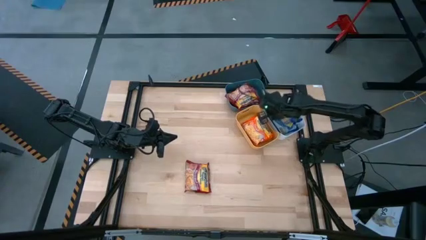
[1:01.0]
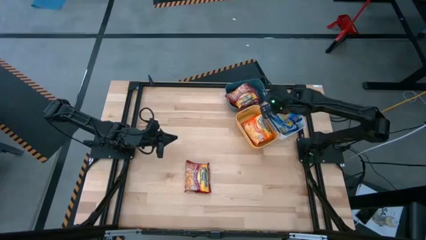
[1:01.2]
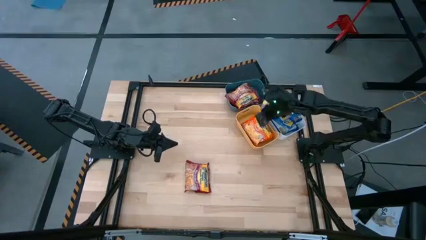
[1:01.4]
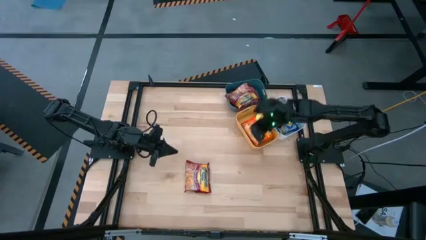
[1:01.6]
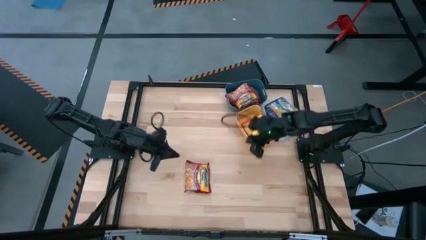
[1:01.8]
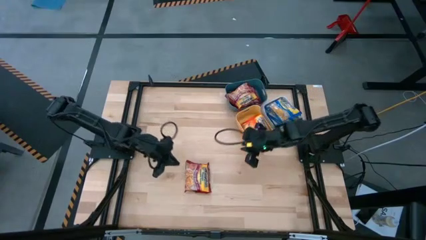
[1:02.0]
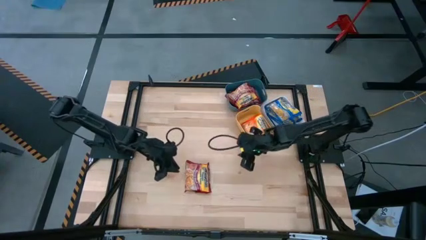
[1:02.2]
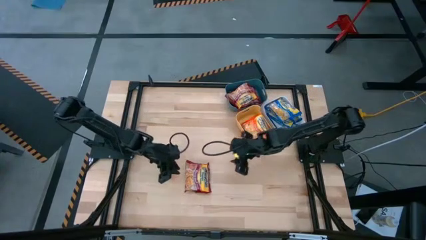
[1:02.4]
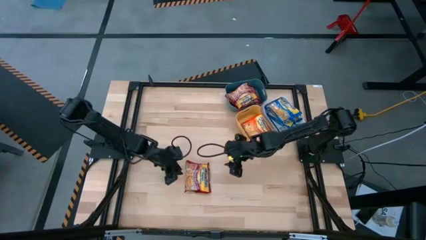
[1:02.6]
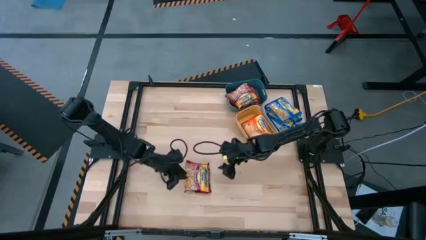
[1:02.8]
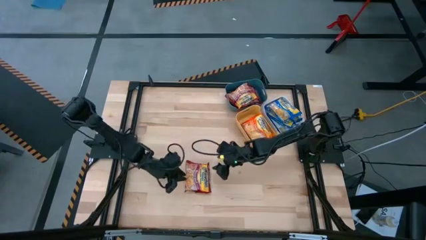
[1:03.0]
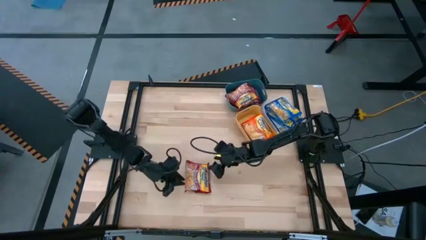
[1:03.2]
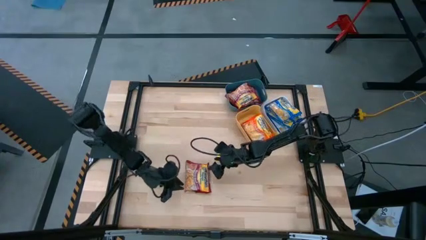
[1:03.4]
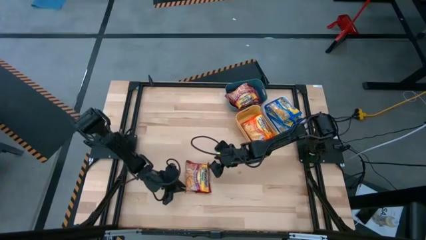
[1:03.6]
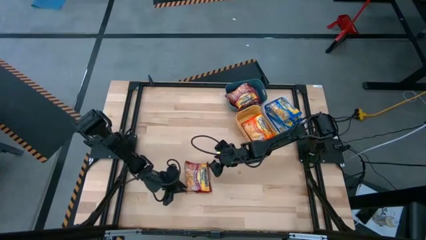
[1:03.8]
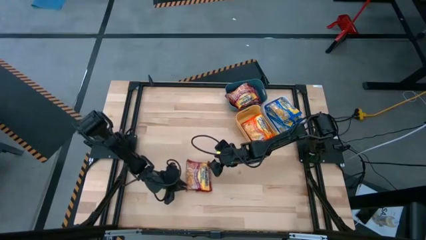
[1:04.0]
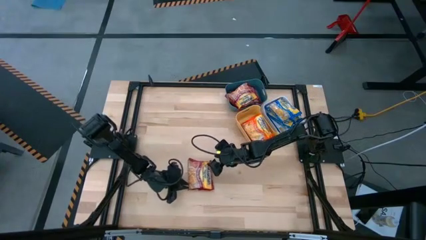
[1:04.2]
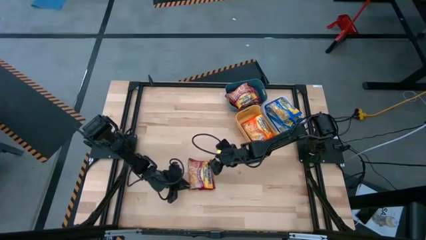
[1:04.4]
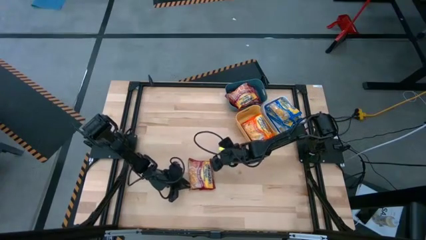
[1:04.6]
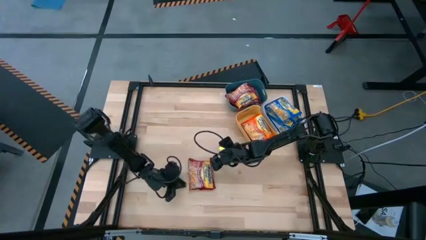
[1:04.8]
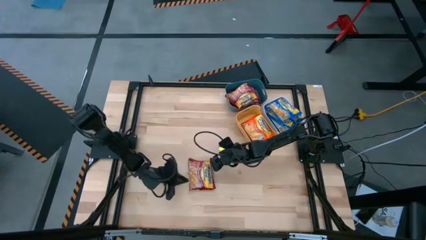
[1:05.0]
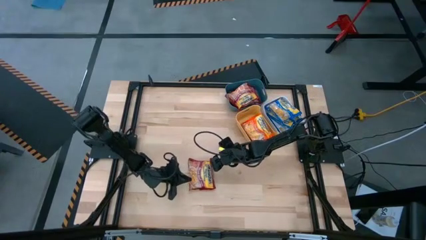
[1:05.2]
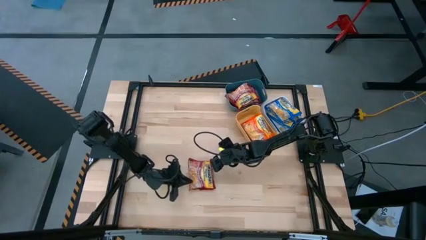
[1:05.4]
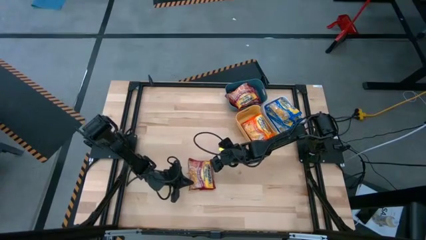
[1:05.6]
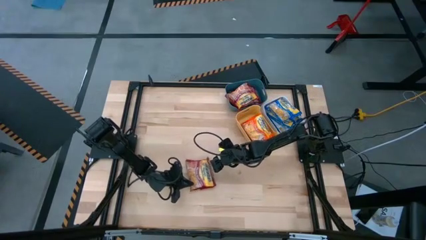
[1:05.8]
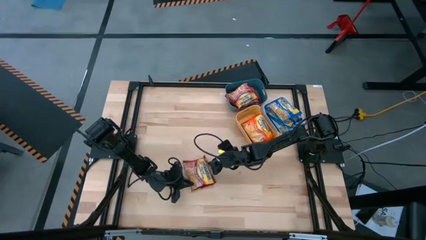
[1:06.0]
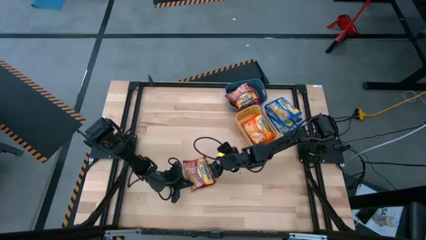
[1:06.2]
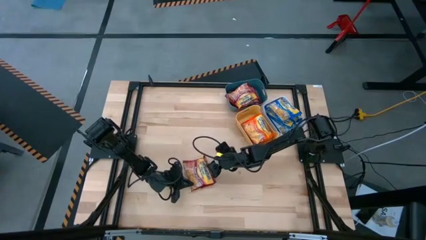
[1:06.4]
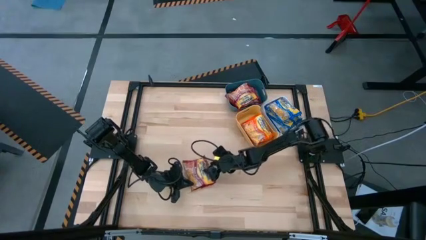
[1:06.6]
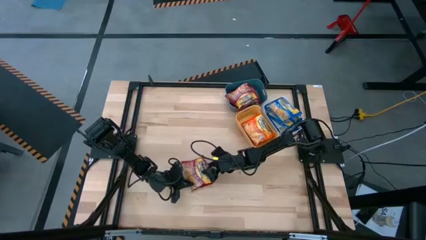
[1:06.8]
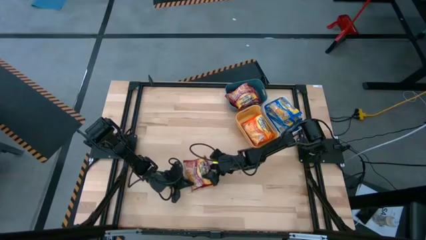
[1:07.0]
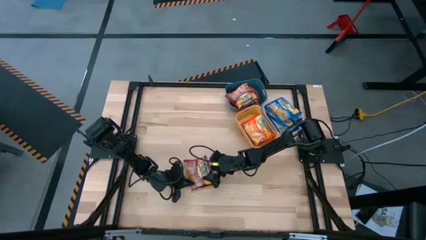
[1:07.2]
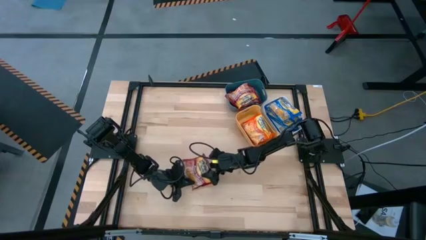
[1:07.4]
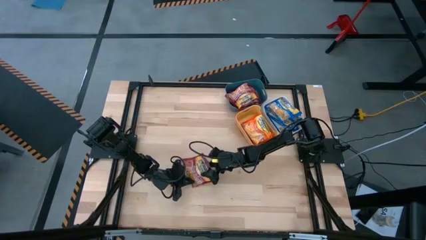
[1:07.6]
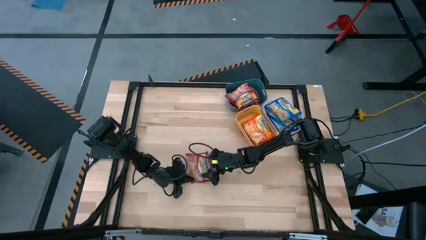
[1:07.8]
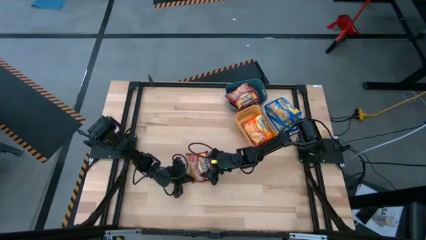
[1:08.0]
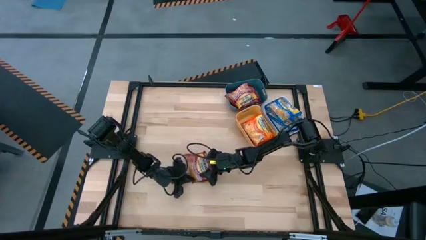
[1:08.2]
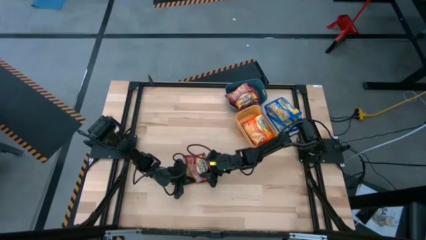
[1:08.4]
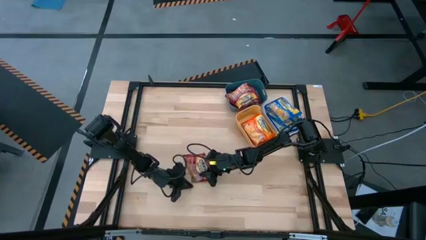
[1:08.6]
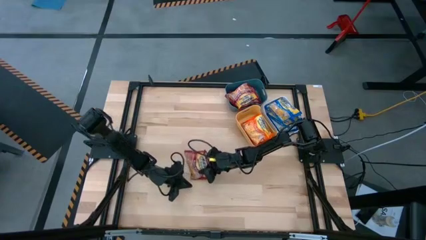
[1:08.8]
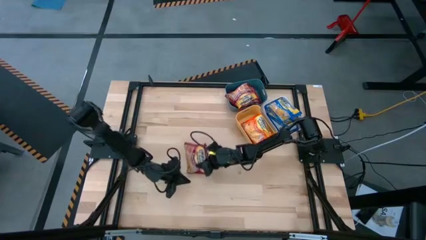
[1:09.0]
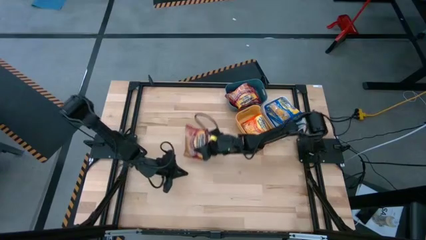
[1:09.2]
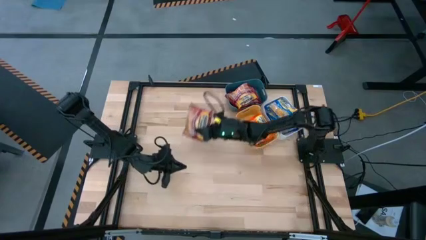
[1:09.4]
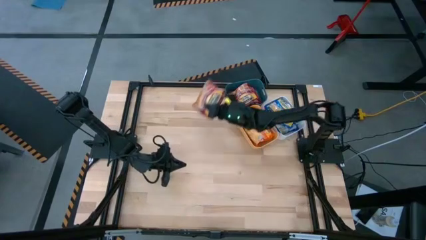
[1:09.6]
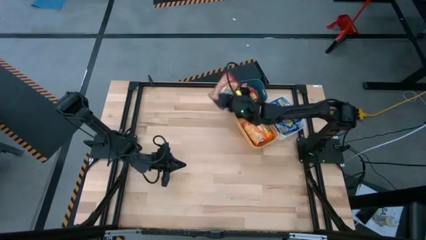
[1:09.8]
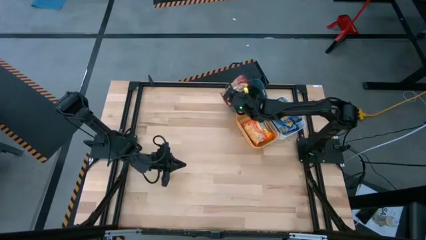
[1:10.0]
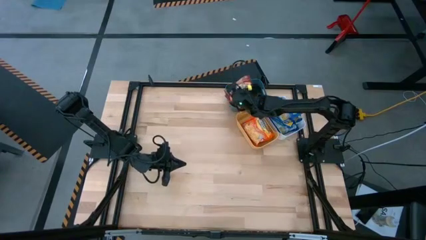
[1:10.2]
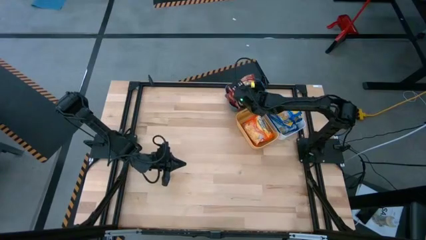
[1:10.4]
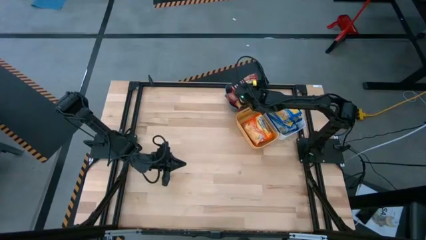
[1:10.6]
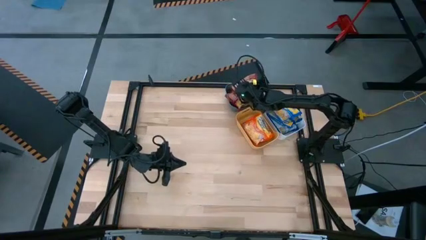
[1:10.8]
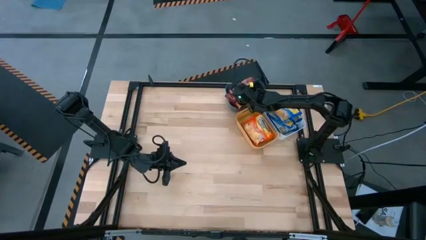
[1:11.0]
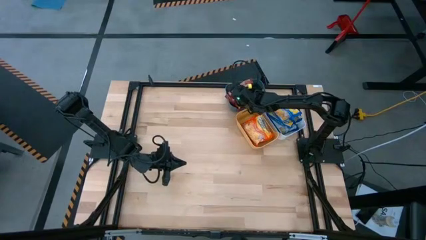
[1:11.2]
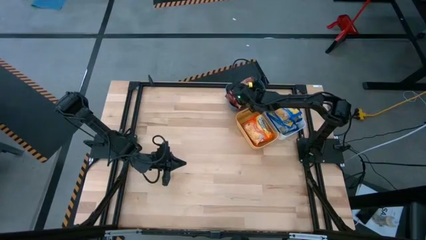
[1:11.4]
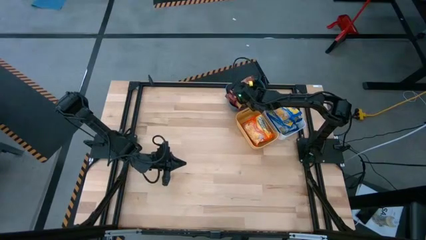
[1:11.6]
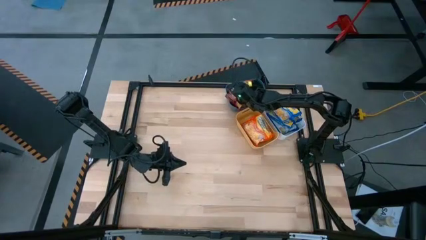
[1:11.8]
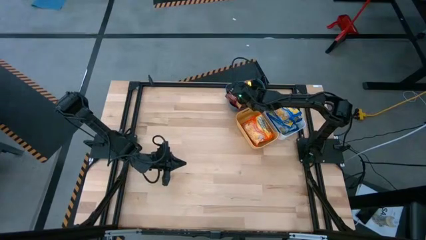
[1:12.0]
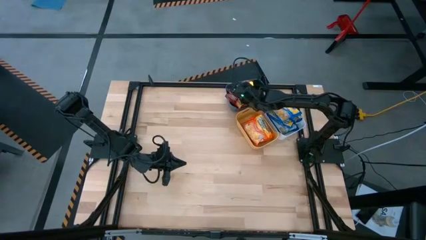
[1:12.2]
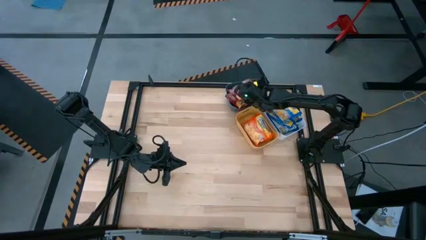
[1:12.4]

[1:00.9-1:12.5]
Task: Sort Maruchan noodles
Put the red noodle pack into the blue bin

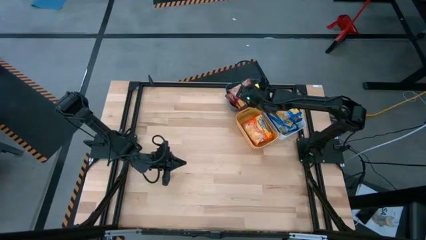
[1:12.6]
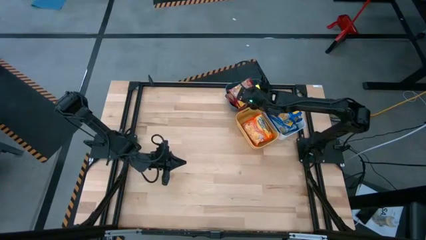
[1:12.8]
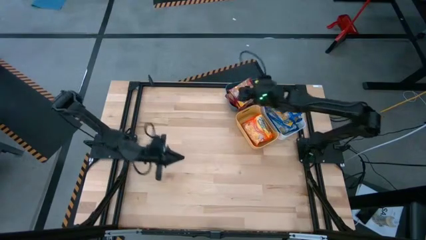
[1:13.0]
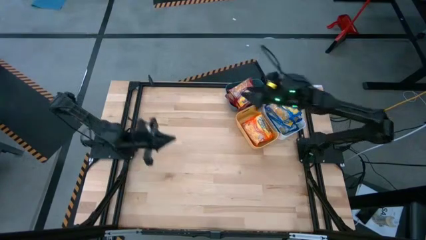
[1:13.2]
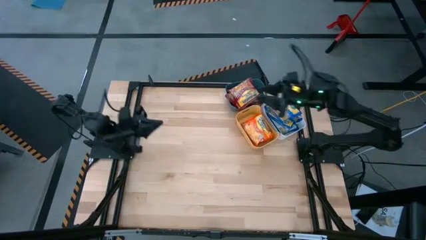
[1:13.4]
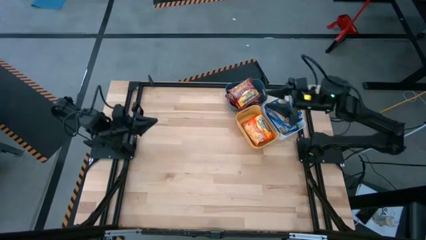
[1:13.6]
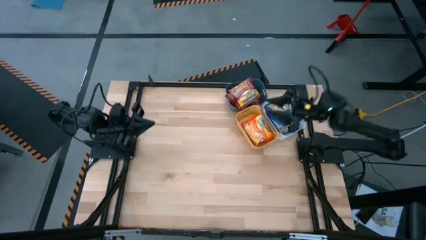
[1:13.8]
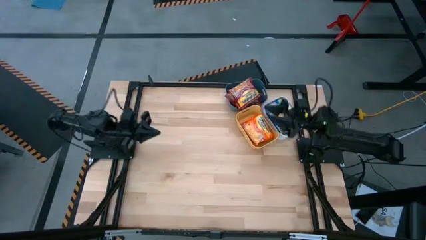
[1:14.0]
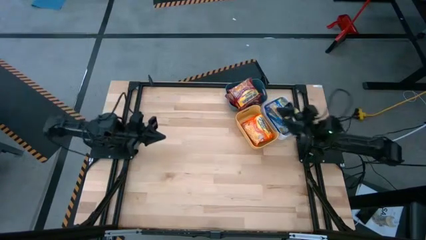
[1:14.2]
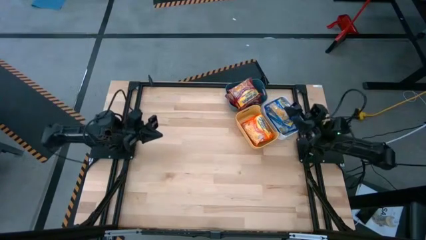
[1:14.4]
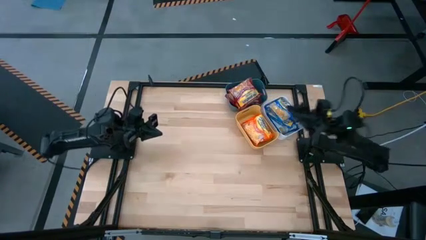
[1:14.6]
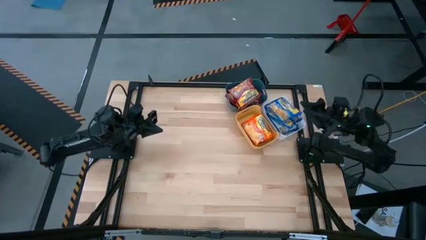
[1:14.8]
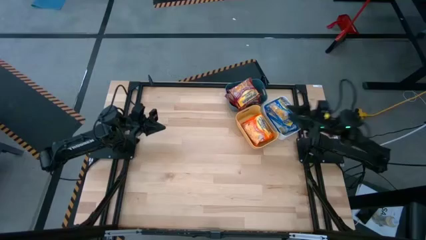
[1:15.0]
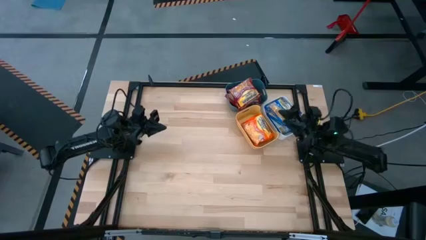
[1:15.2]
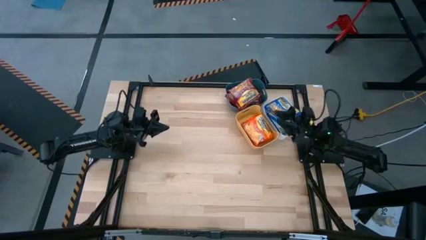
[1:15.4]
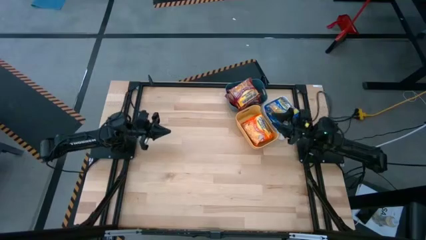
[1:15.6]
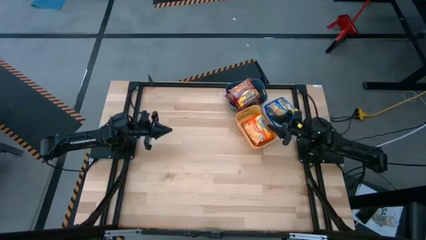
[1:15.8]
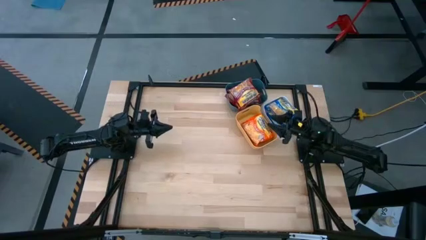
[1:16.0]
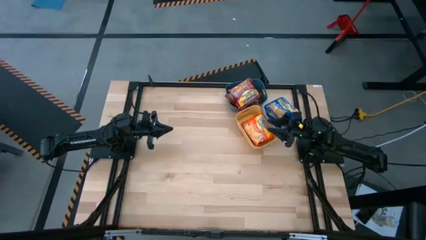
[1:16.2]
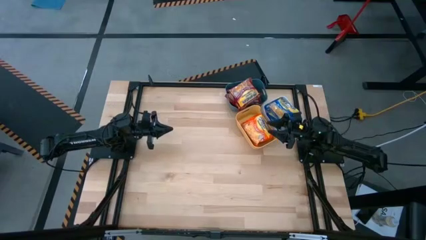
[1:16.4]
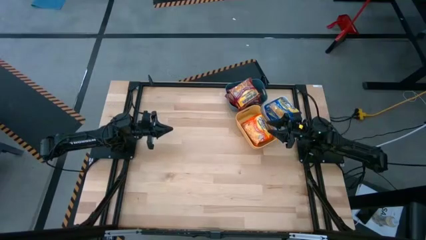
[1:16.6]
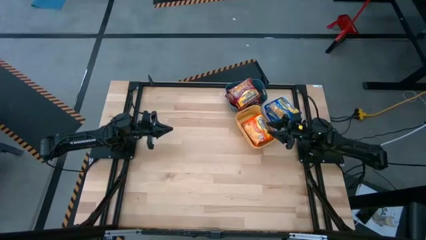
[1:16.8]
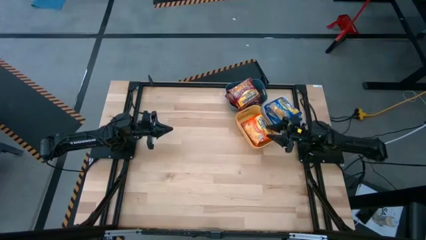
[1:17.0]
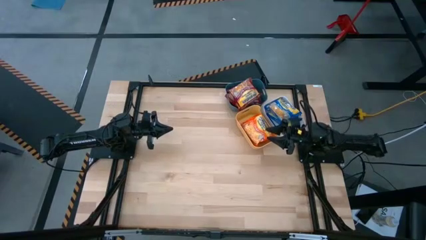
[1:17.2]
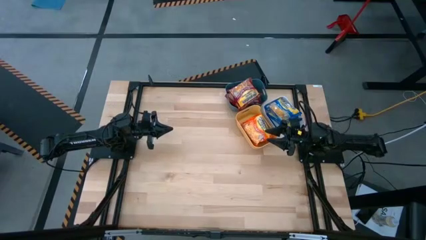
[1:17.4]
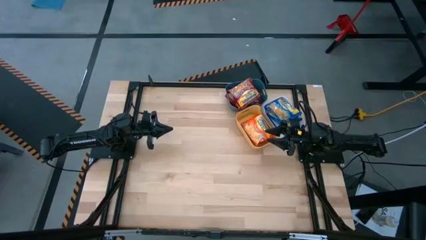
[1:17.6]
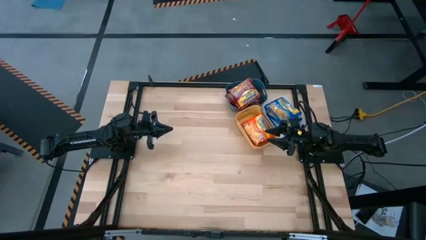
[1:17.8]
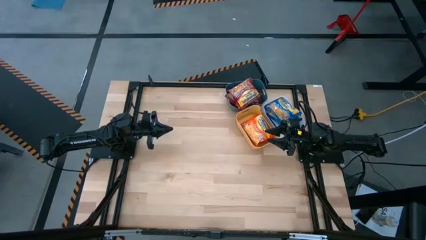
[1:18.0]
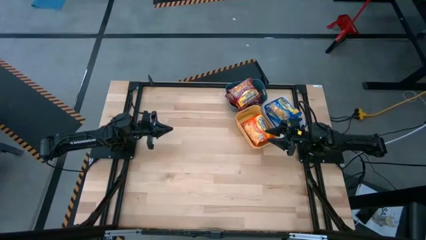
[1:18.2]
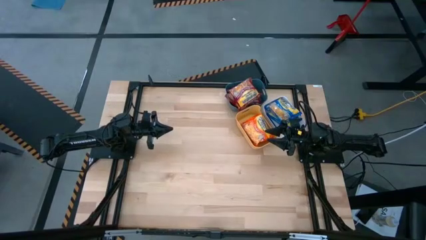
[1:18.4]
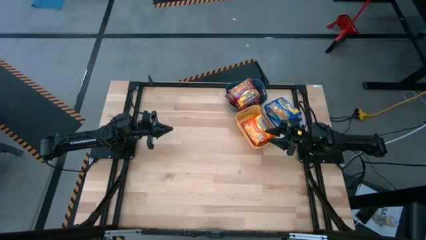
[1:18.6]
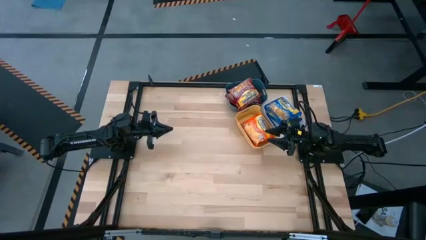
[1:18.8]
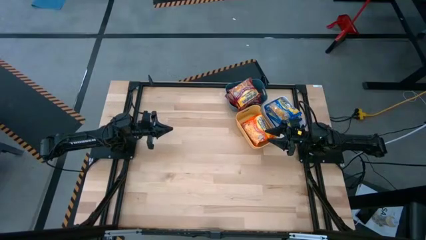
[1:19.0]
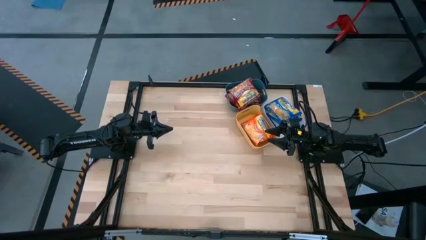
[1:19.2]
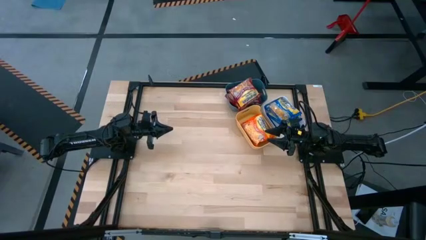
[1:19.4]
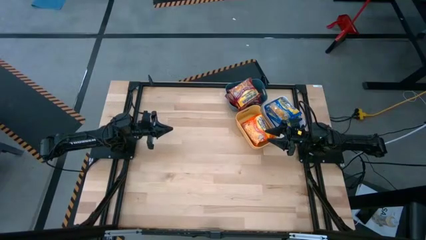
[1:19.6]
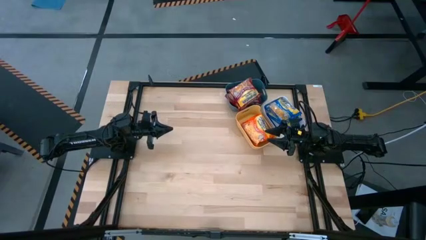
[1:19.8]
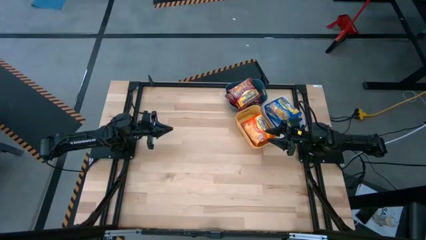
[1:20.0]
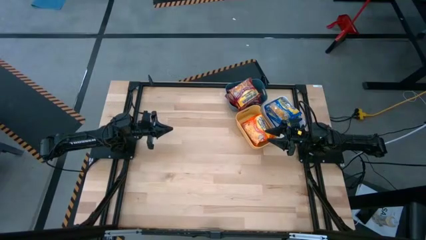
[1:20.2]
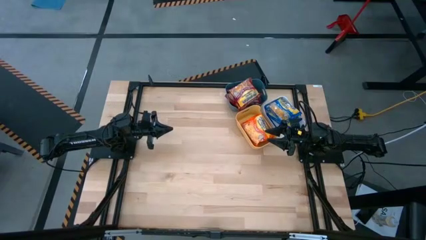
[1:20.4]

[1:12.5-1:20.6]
Return to Home Position
